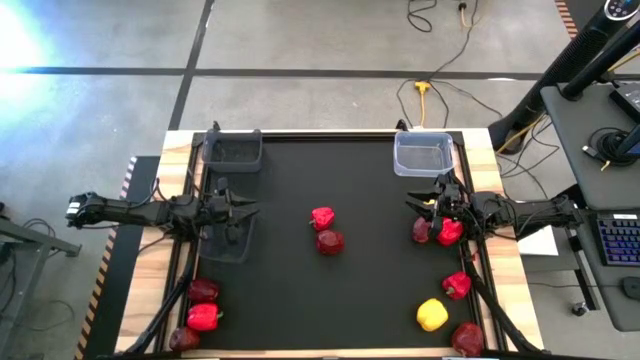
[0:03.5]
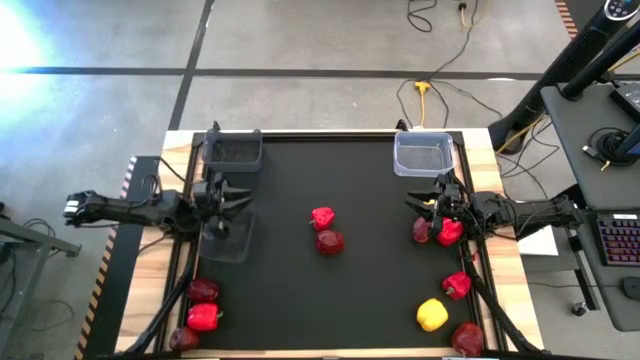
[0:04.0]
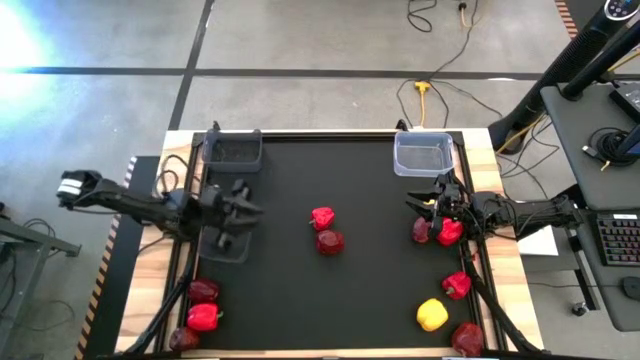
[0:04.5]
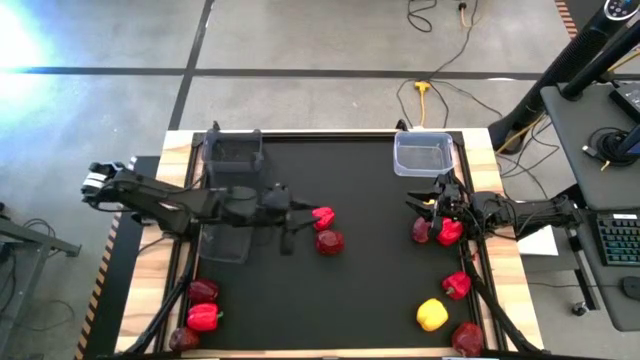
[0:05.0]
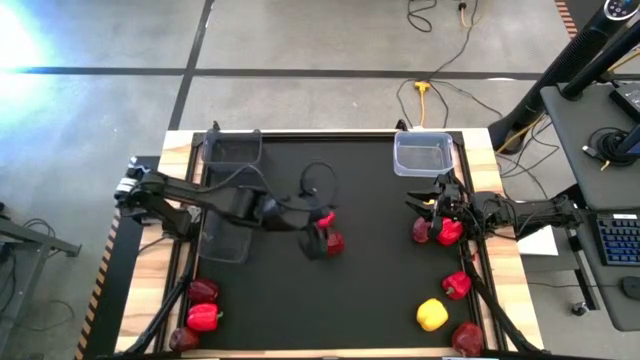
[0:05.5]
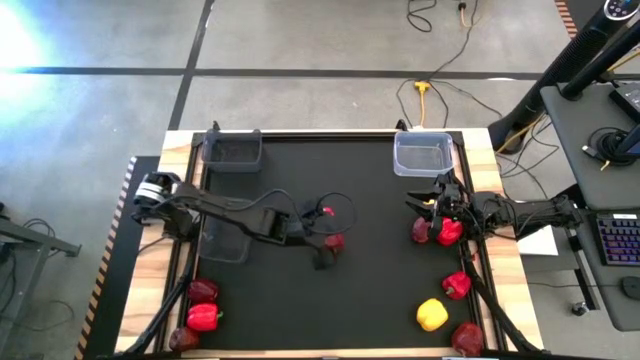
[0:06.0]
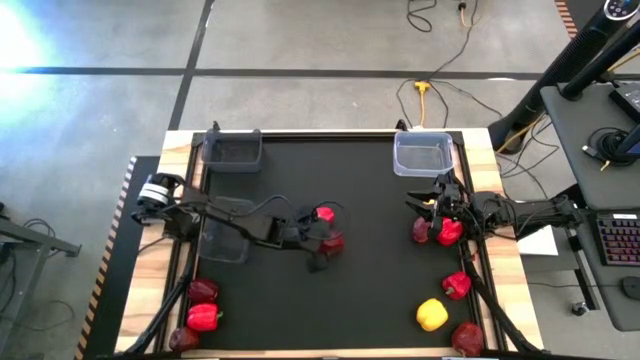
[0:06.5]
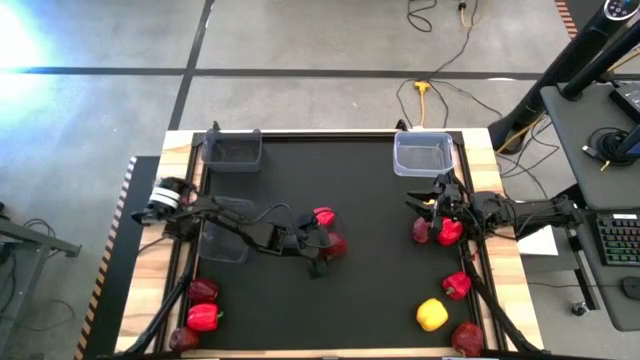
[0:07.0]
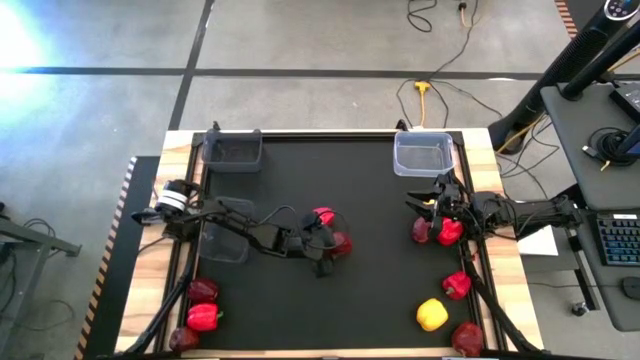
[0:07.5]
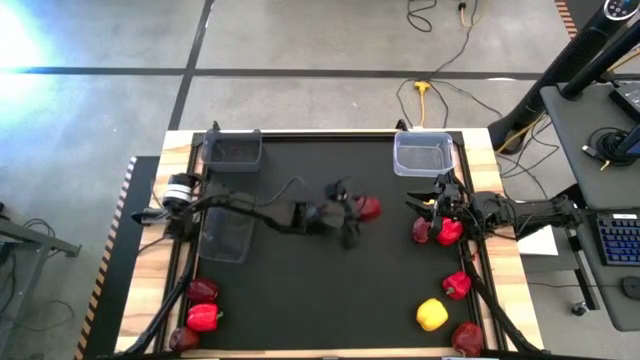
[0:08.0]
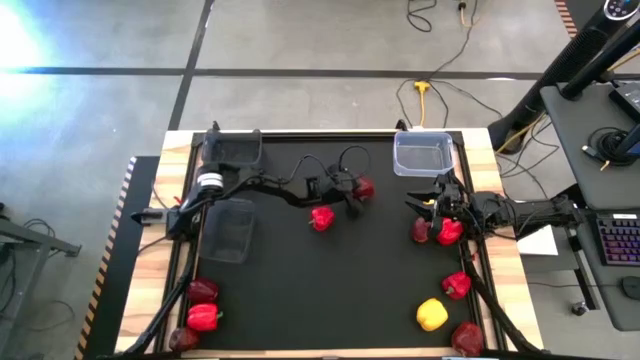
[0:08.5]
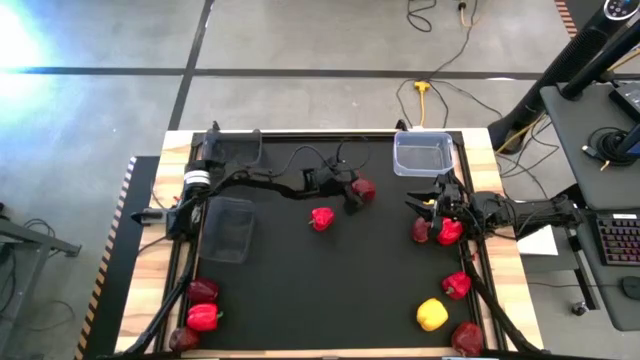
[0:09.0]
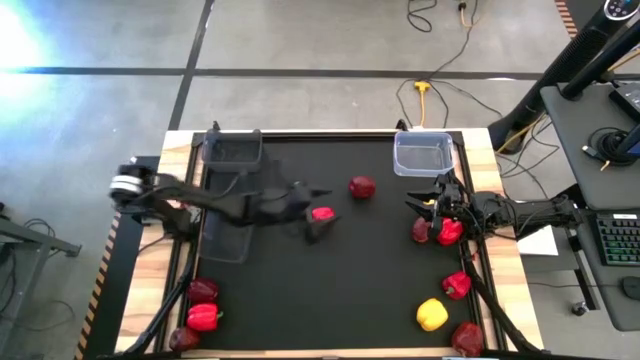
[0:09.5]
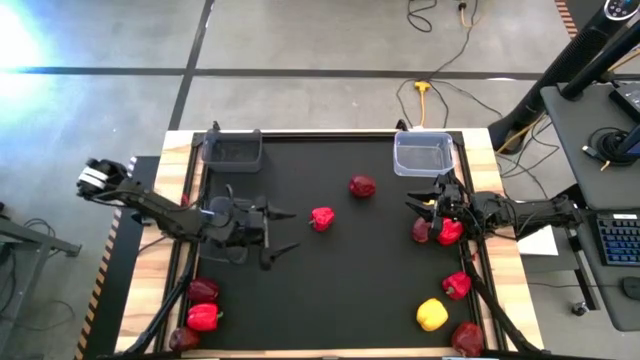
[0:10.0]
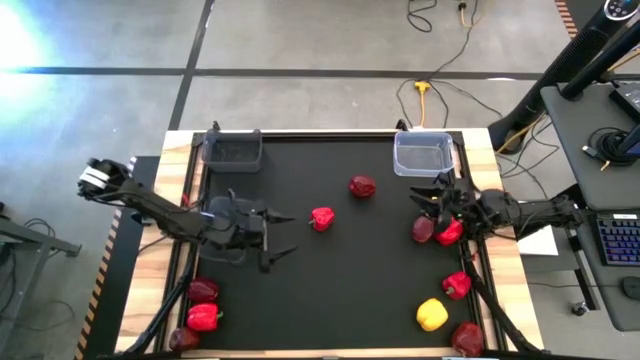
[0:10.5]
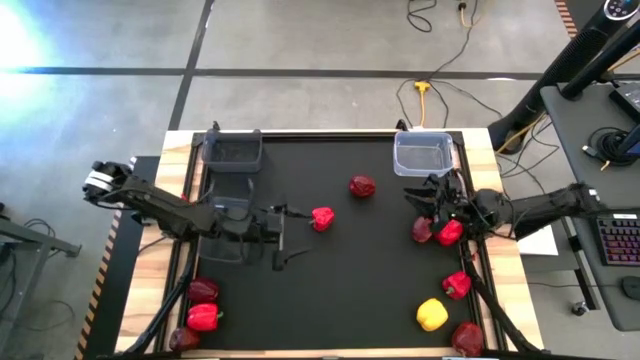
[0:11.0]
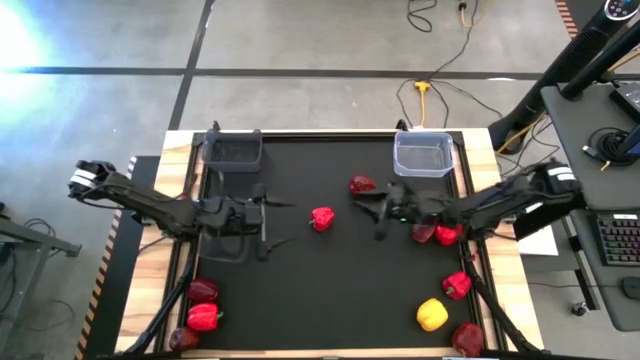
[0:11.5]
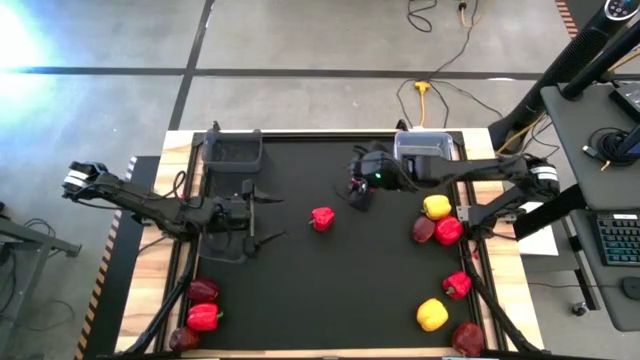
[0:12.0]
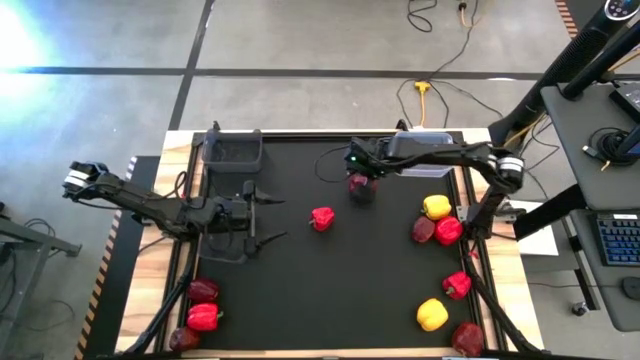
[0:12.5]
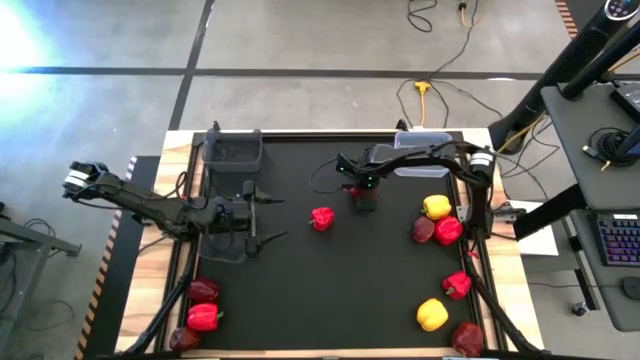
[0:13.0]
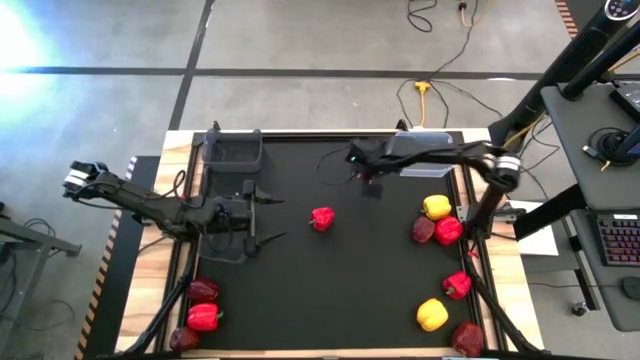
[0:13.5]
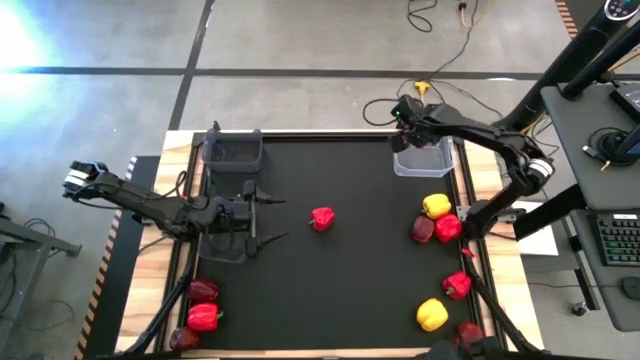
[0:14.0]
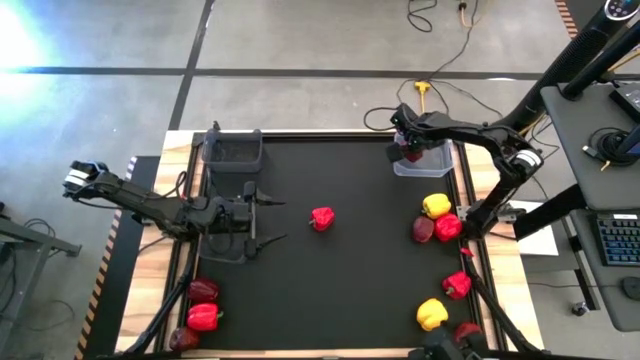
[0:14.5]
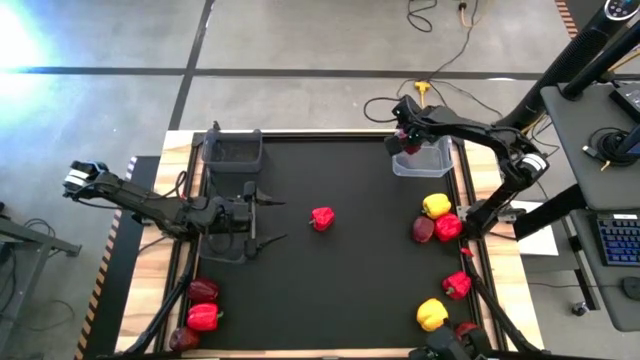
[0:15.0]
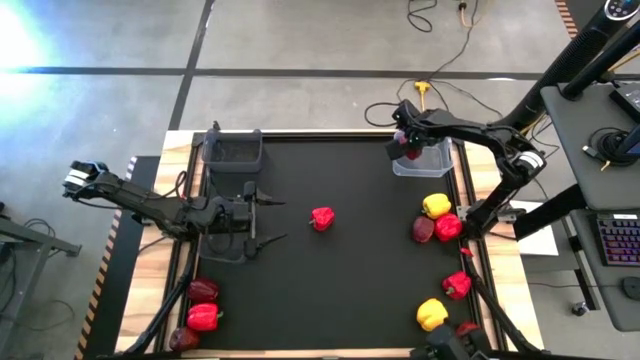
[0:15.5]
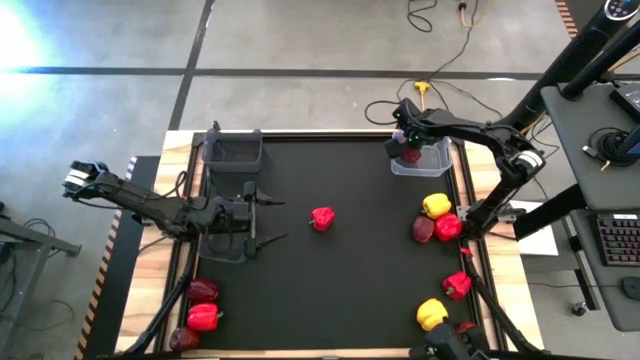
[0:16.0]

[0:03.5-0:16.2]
Task: Sort produce into baskets
Put the apple into the transparent bin

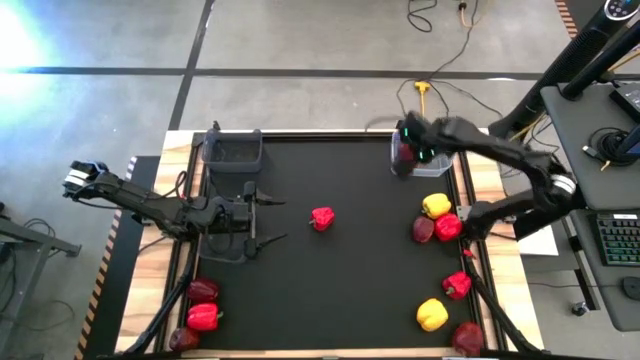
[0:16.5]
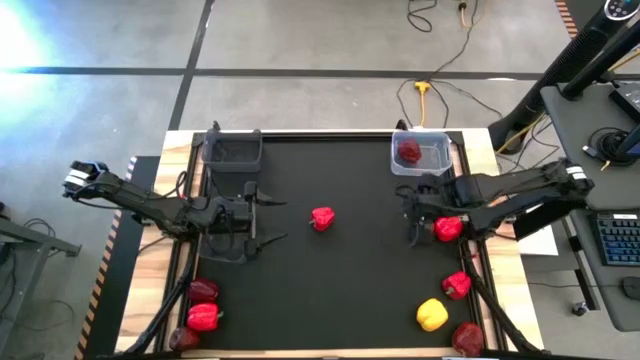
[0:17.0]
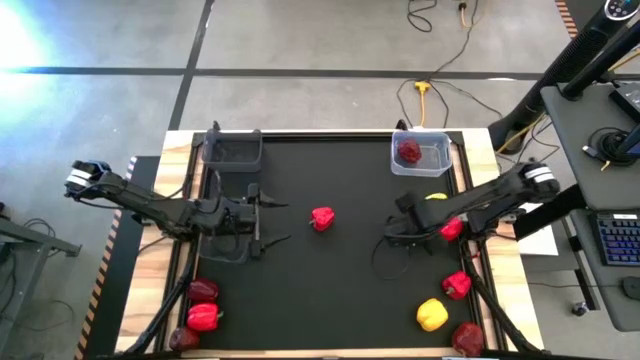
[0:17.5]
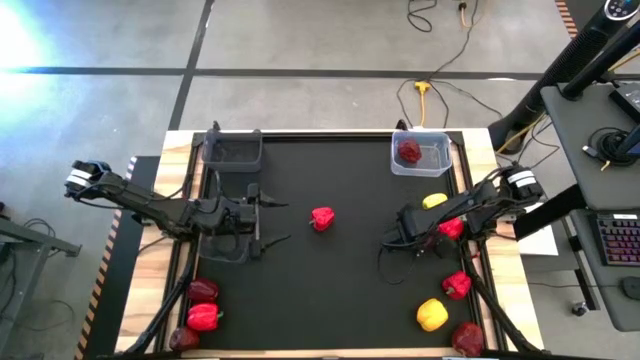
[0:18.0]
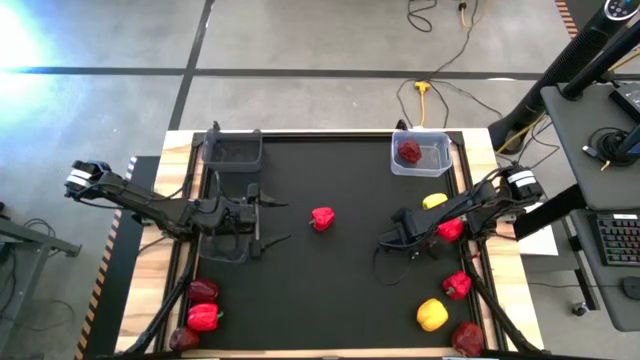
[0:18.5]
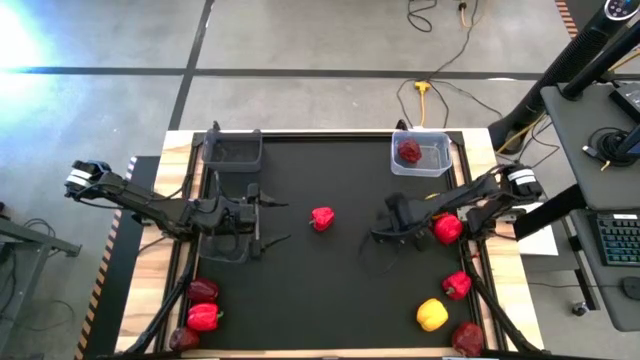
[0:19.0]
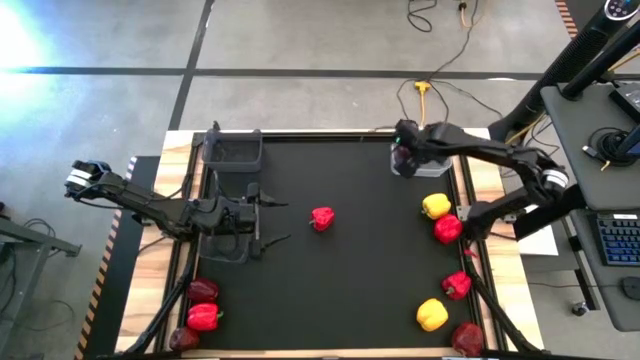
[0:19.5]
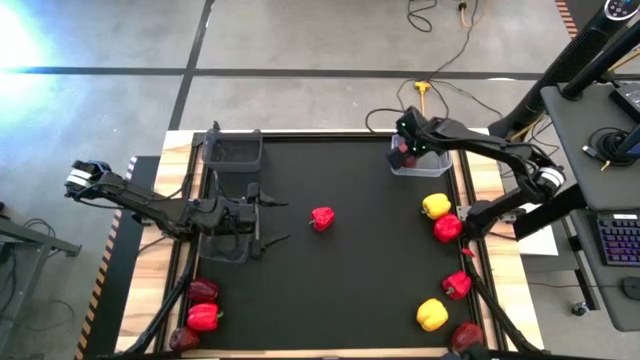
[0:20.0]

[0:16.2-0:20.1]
Put the apple into the transparent bin
